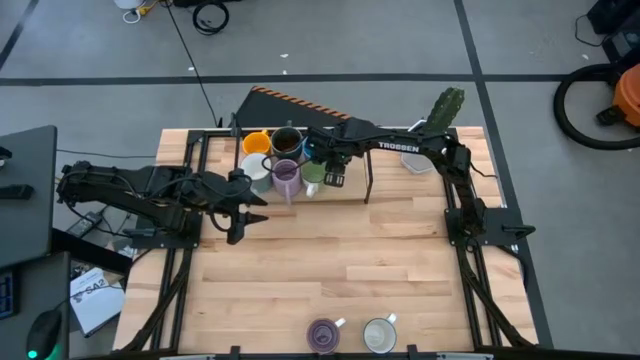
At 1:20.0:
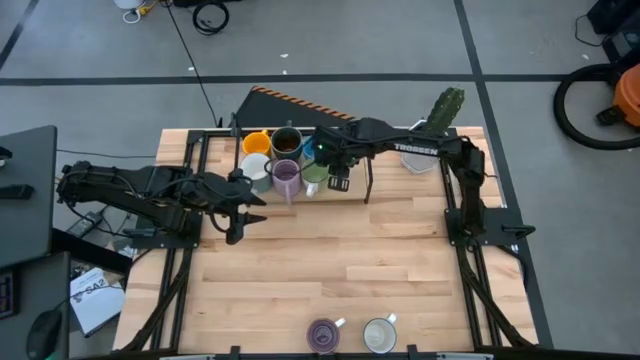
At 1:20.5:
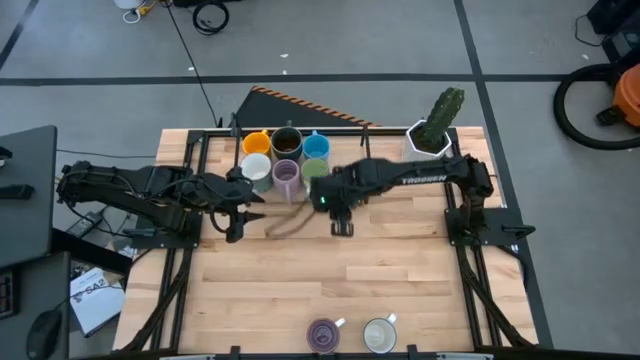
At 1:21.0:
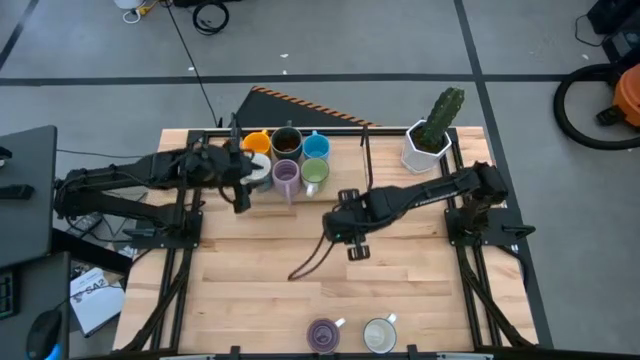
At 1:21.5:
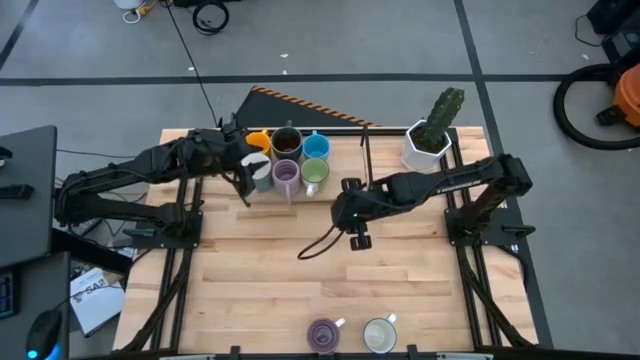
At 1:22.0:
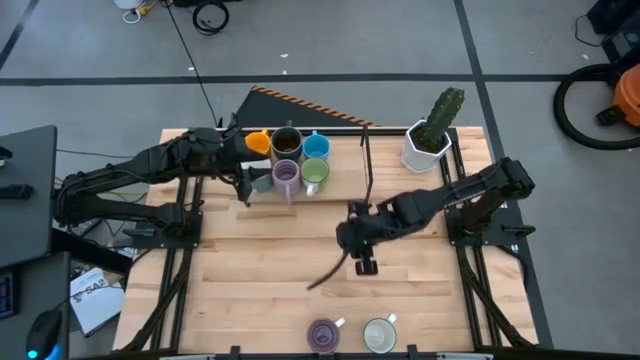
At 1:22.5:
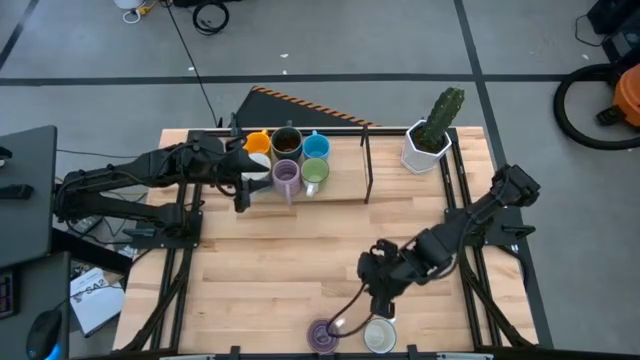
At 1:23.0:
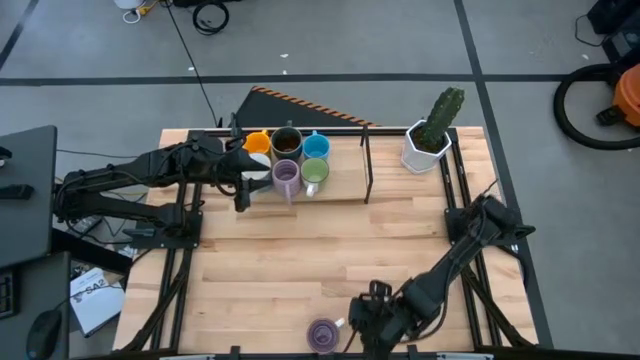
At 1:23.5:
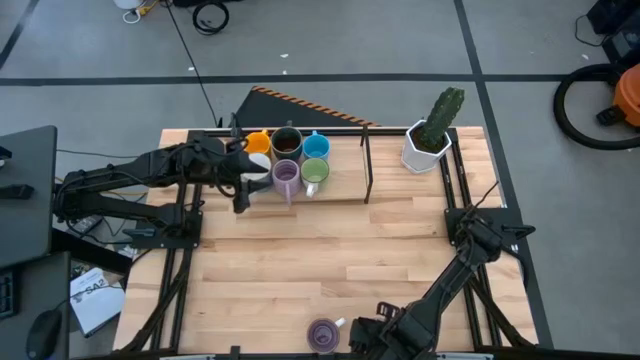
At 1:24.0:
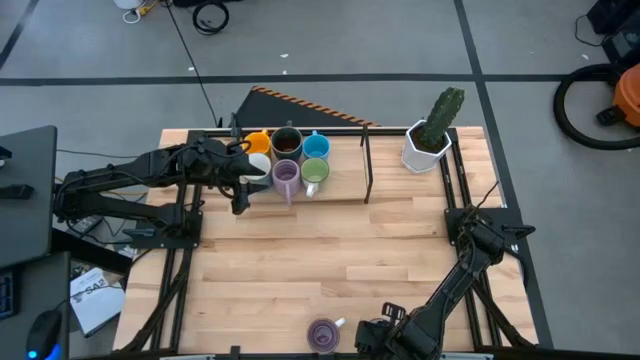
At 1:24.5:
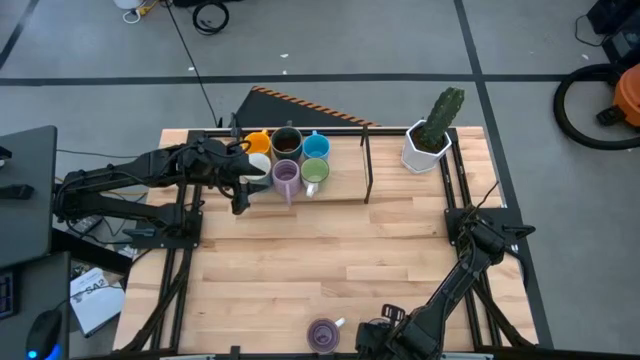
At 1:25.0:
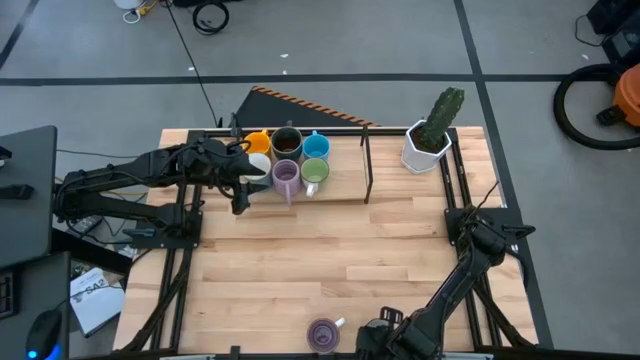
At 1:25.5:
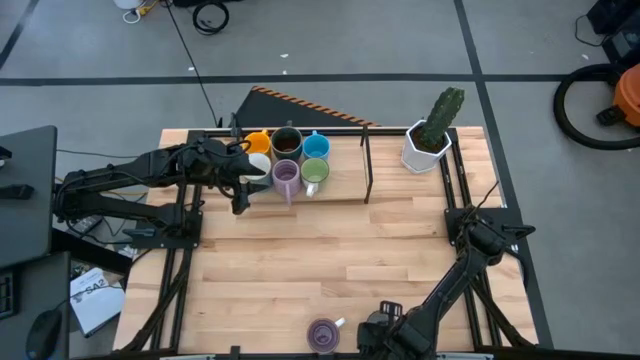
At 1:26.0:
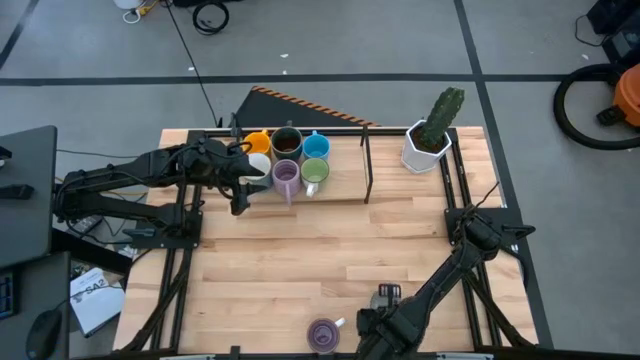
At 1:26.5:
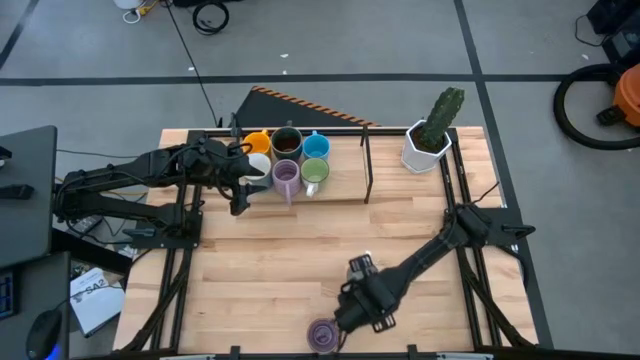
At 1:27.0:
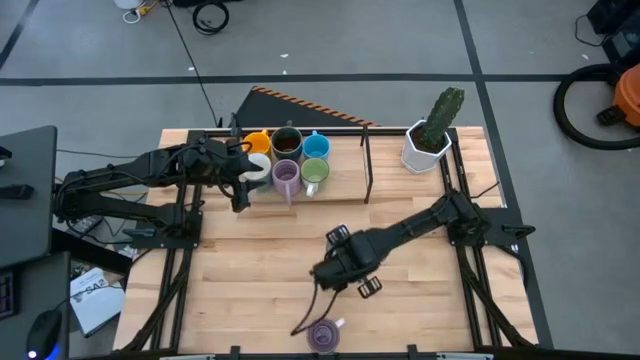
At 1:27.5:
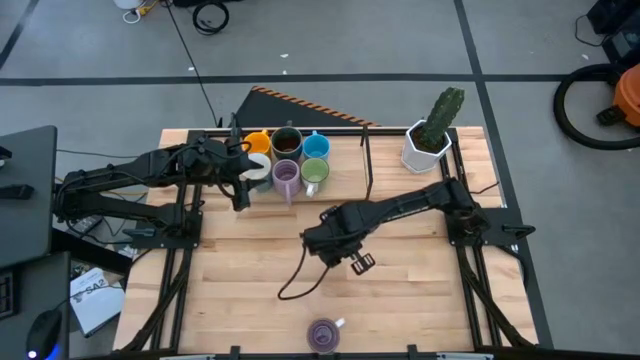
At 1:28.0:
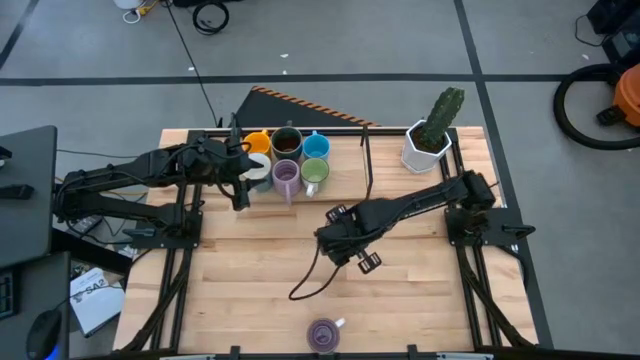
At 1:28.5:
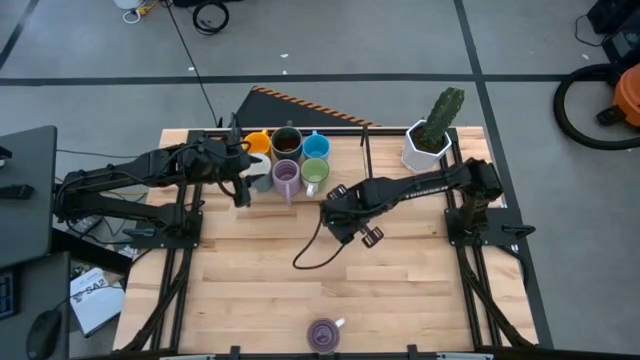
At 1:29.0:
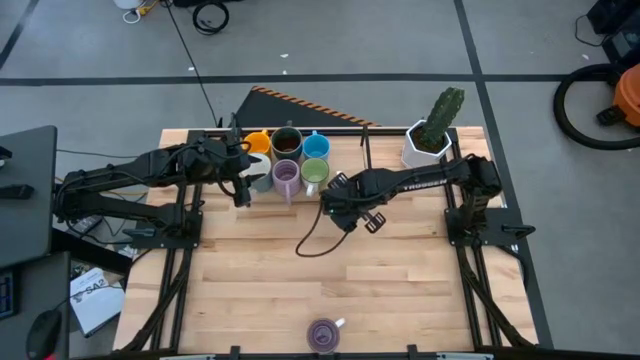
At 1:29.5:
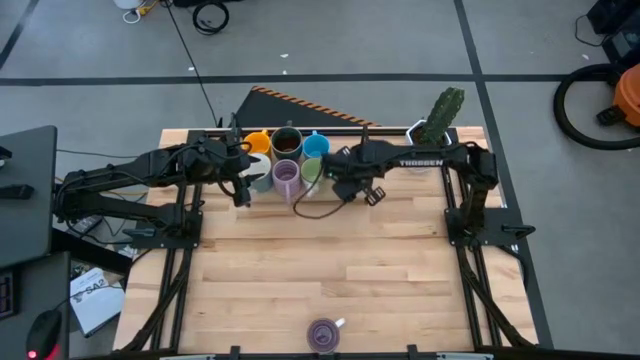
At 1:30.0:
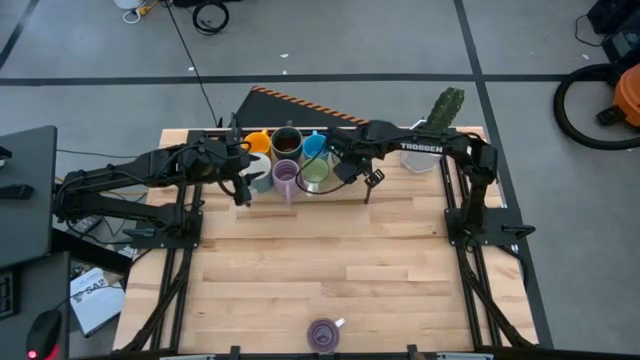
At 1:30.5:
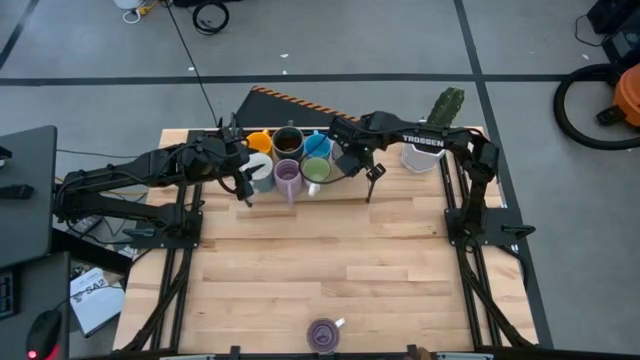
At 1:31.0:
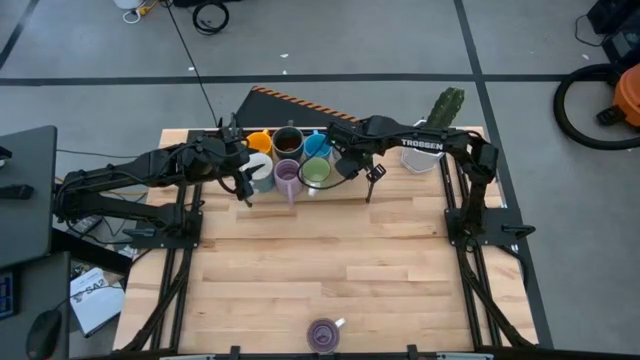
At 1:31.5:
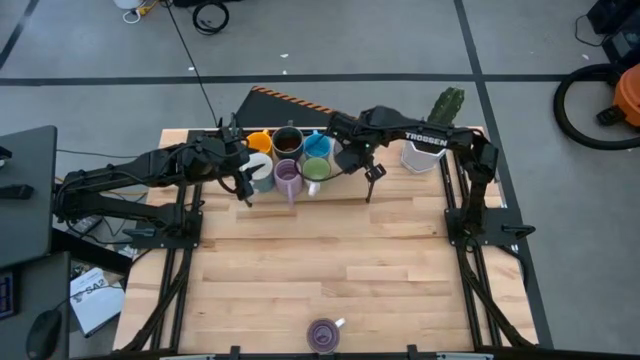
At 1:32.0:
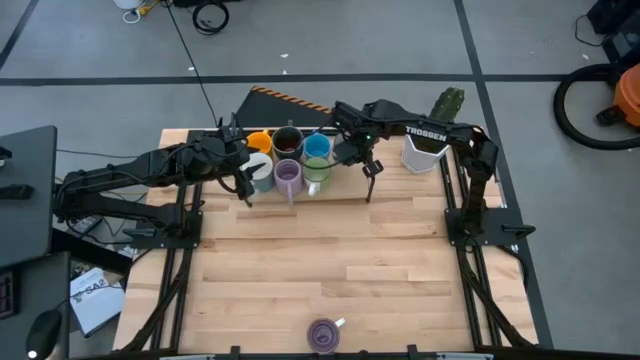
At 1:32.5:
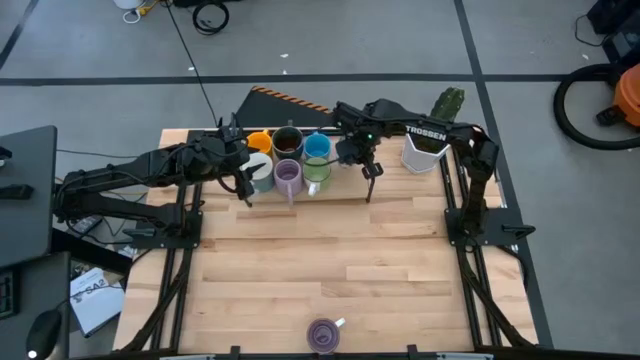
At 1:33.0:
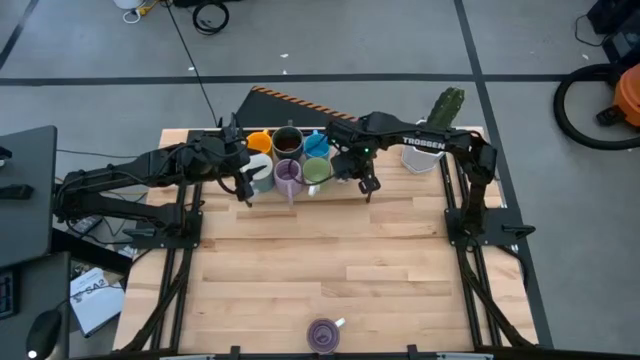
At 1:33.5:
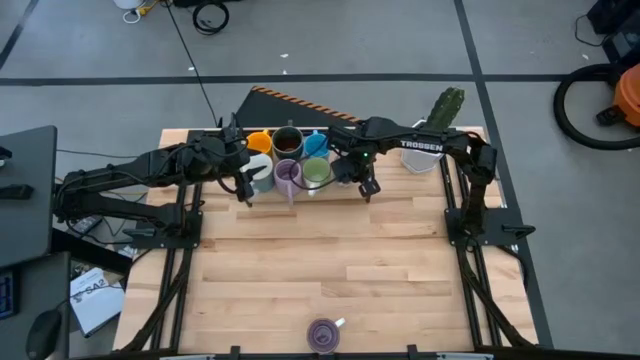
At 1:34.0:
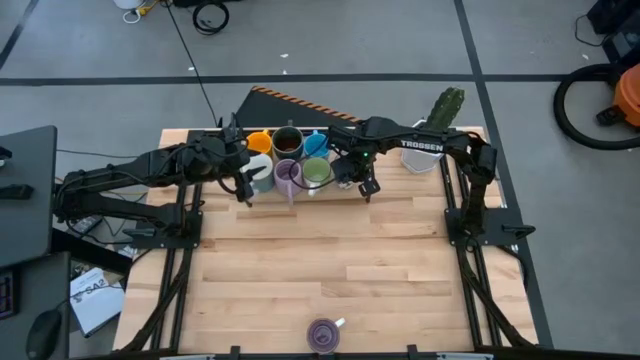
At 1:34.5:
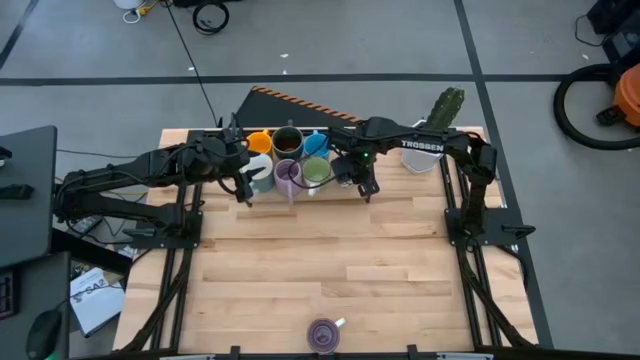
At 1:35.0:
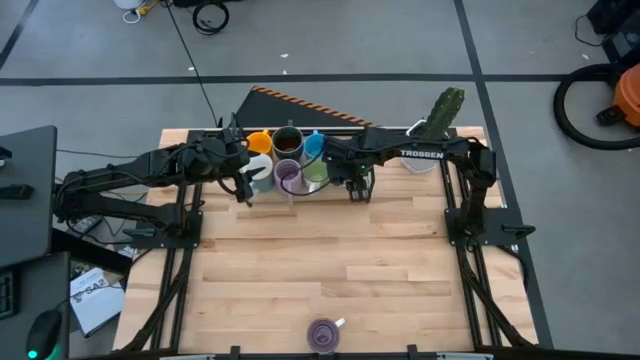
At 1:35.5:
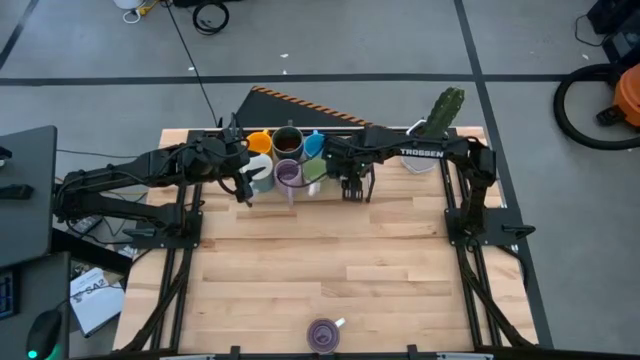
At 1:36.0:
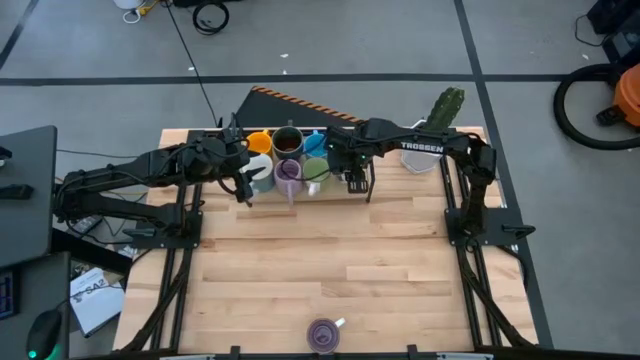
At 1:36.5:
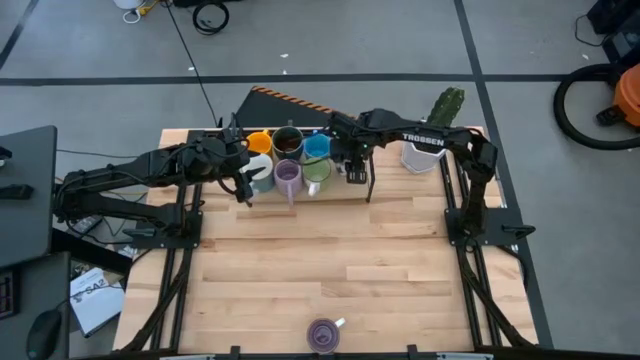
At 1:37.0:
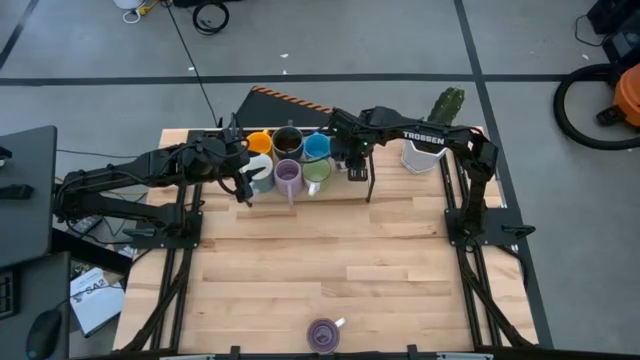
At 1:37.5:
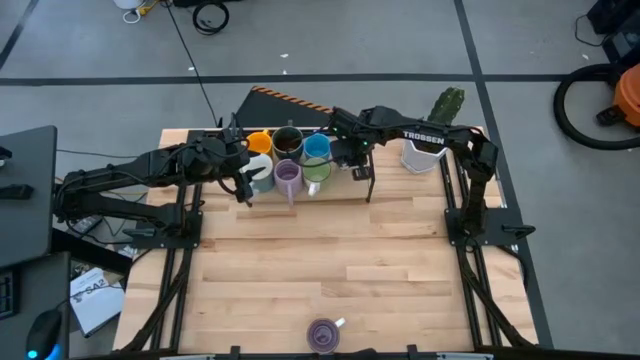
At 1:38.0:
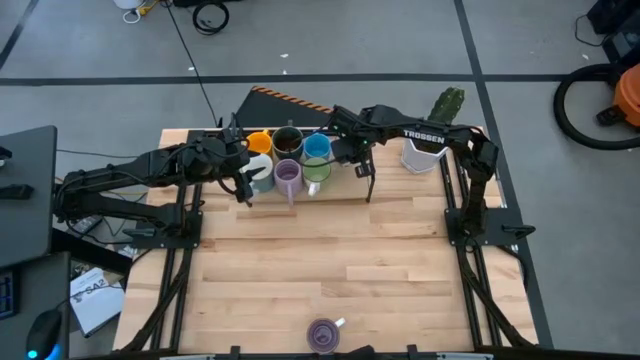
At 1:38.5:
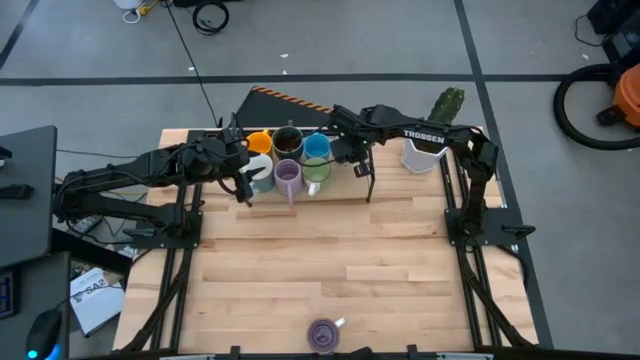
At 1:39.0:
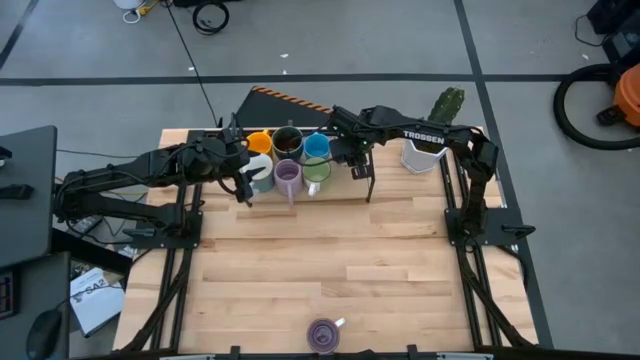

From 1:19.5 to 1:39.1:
Task: Place coffee mugs
Put the blue patterned mug on the shelf

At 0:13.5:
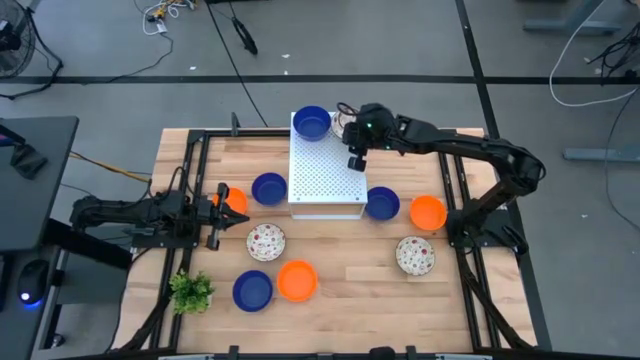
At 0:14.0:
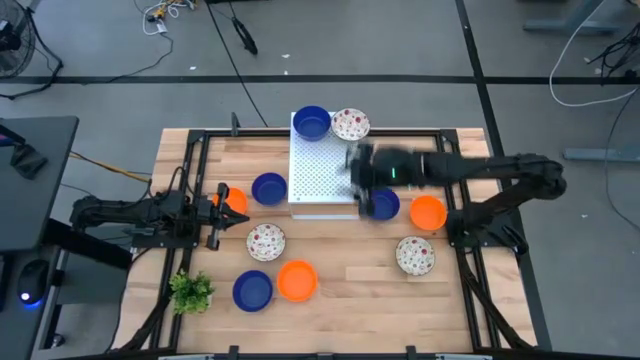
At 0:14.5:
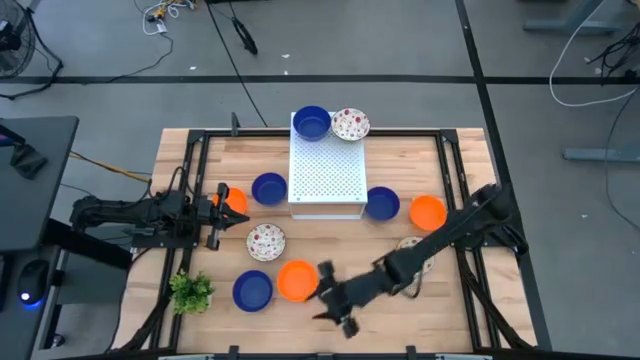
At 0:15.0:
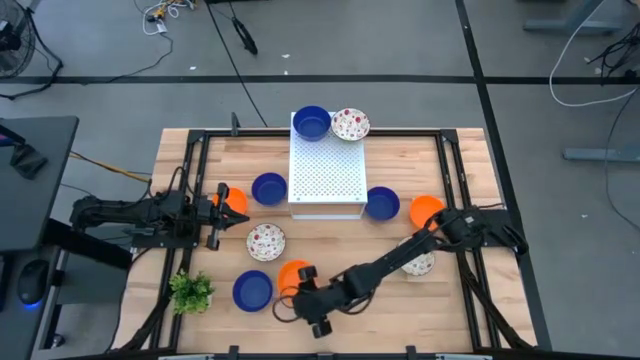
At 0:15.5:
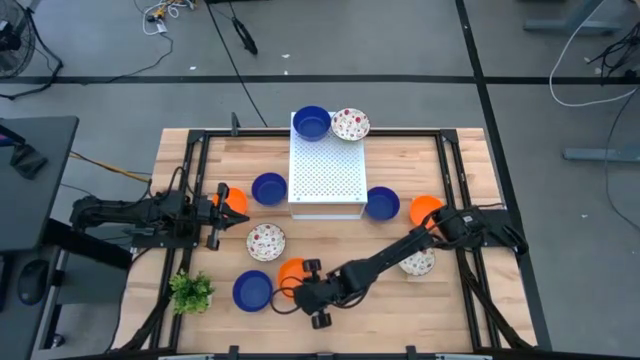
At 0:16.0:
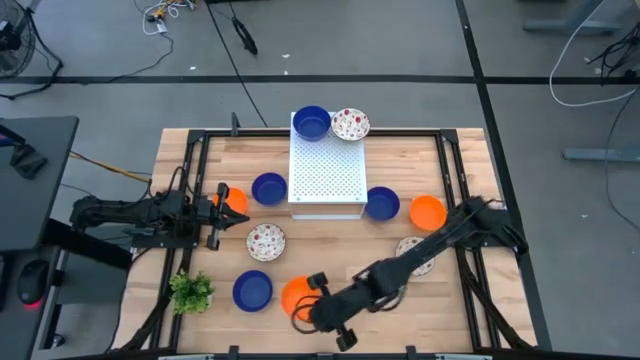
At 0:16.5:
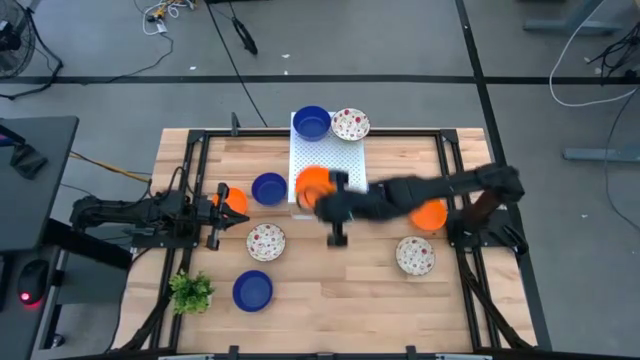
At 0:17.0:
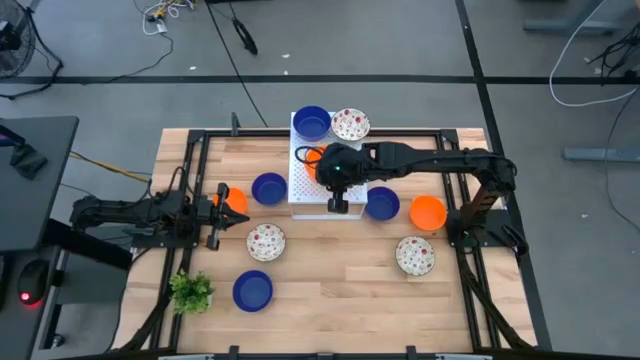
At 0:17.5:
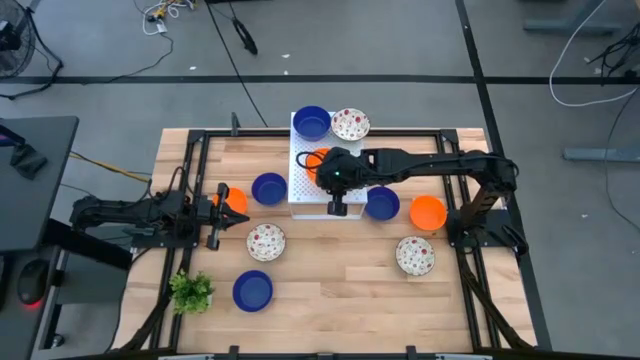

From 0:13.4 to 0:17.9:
Task: Pick & Place Mini bowls
Put the middle orange bowl on the shelf
